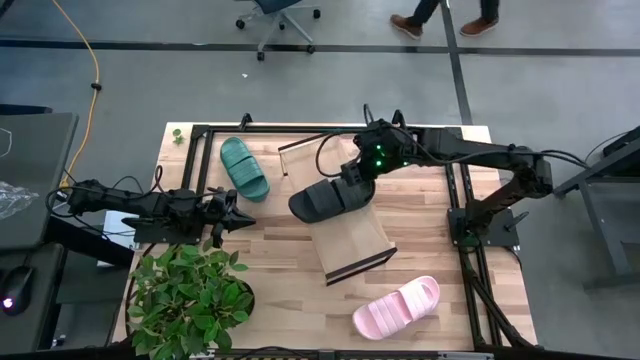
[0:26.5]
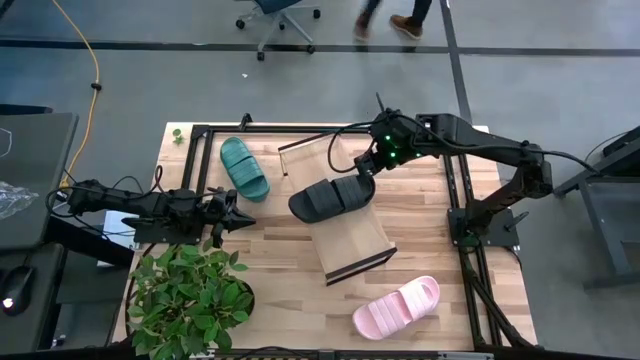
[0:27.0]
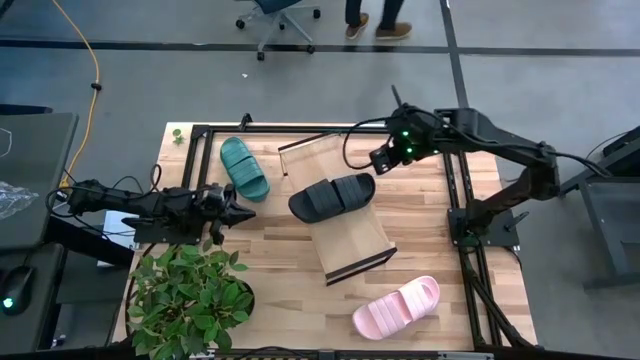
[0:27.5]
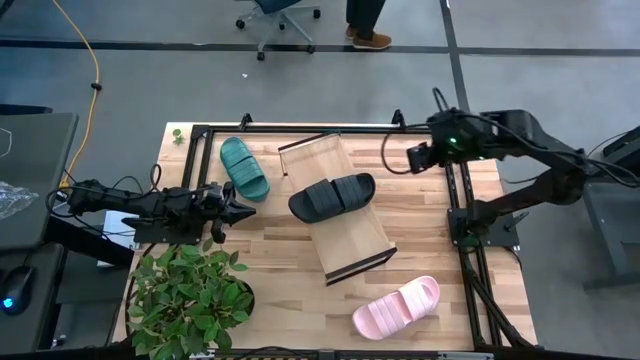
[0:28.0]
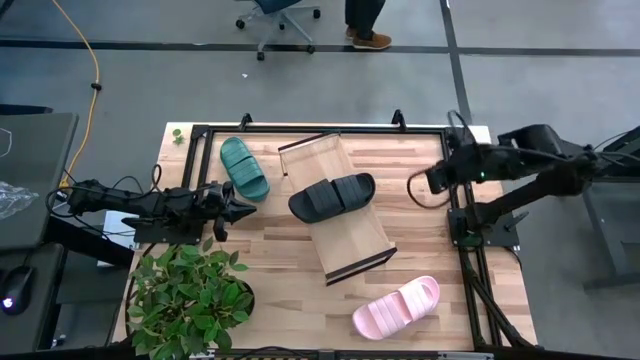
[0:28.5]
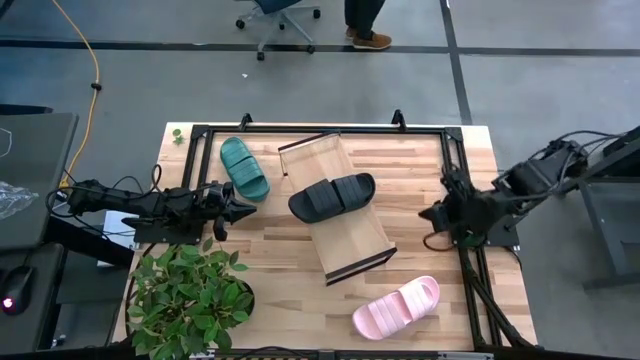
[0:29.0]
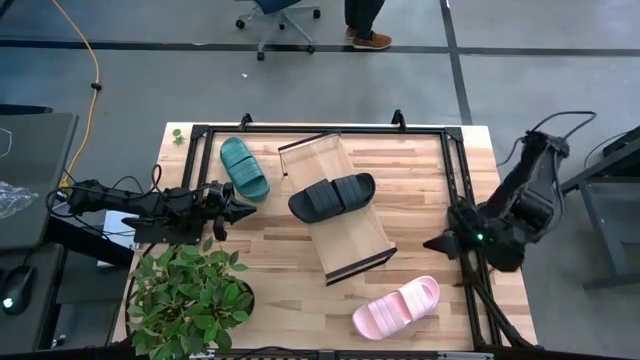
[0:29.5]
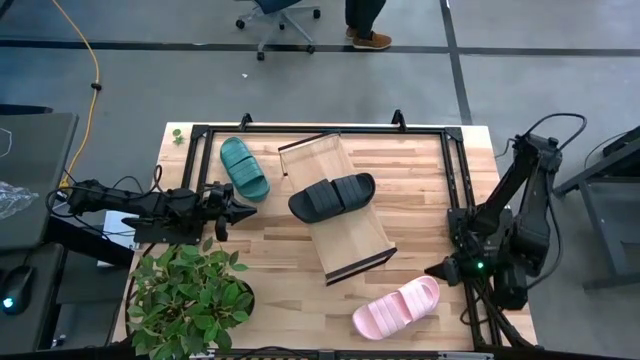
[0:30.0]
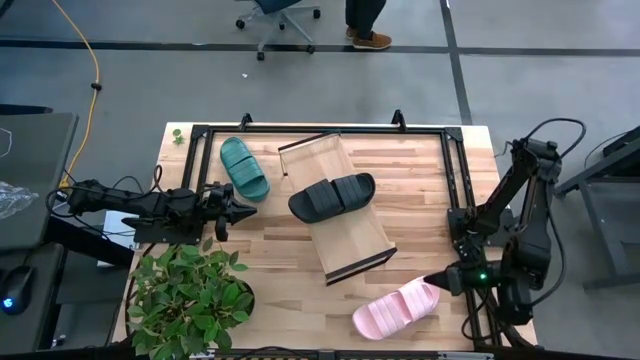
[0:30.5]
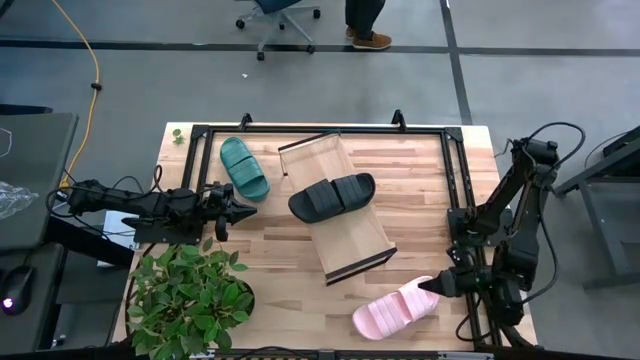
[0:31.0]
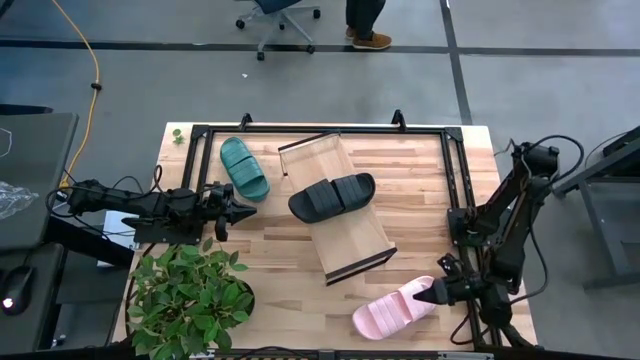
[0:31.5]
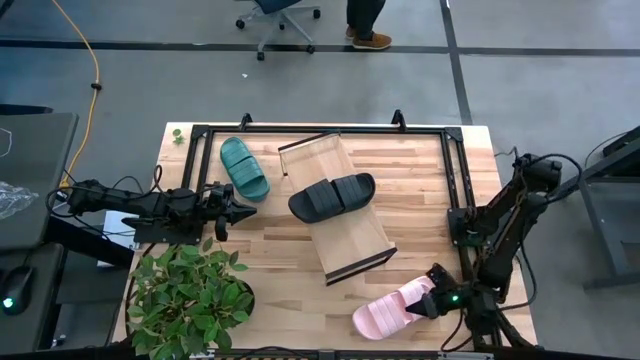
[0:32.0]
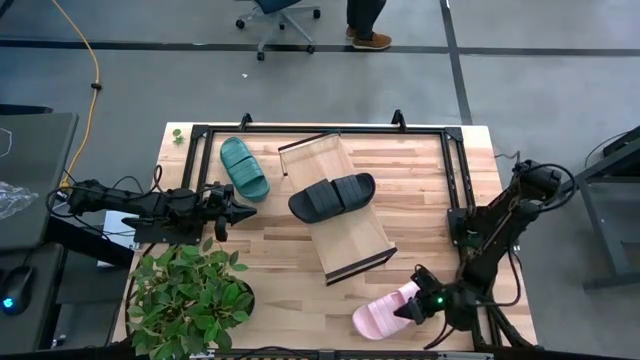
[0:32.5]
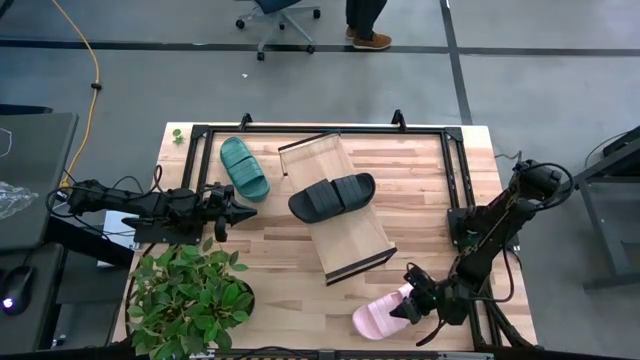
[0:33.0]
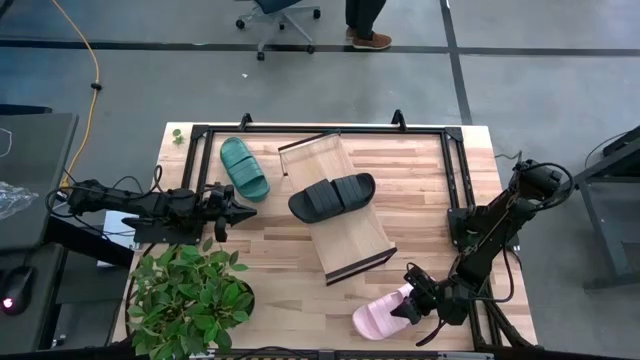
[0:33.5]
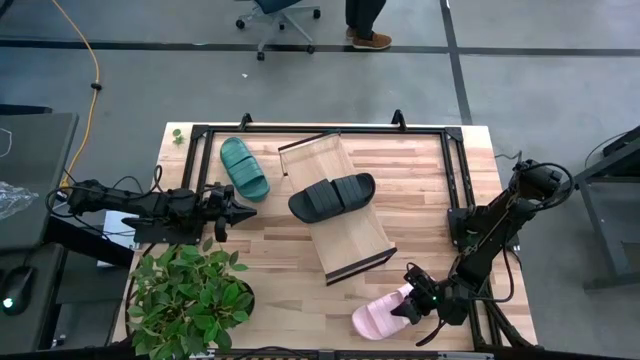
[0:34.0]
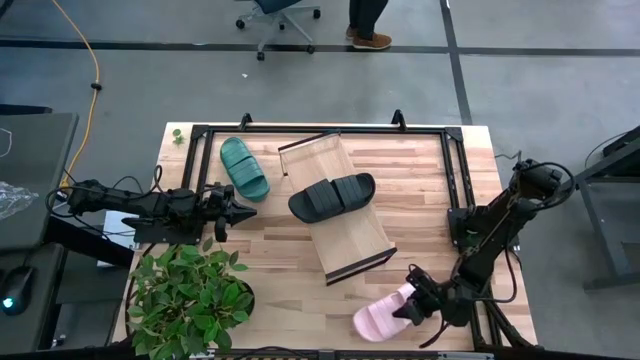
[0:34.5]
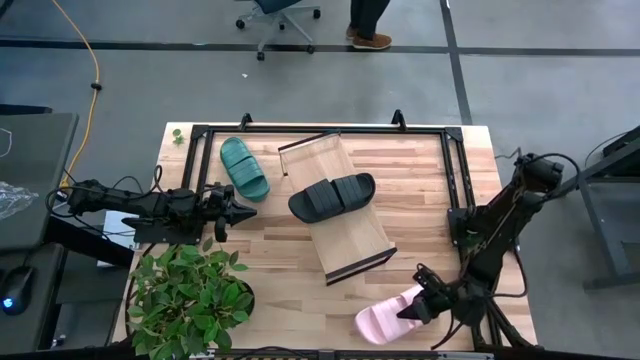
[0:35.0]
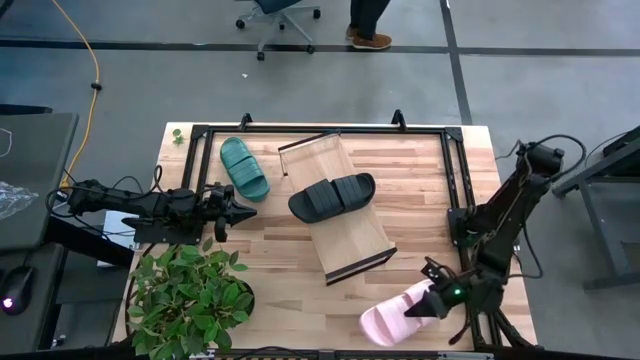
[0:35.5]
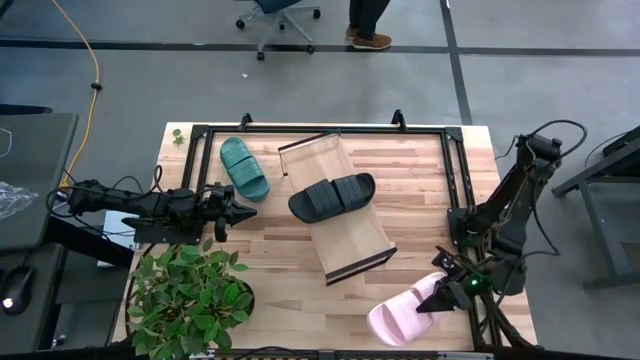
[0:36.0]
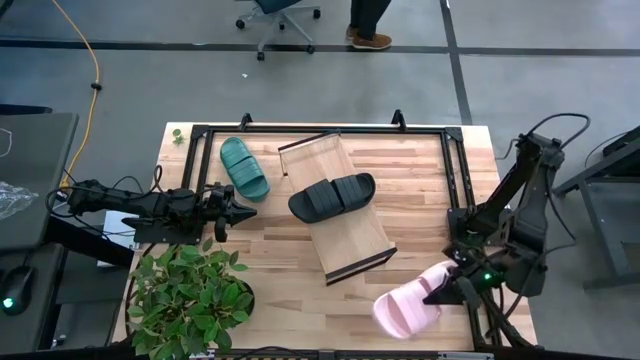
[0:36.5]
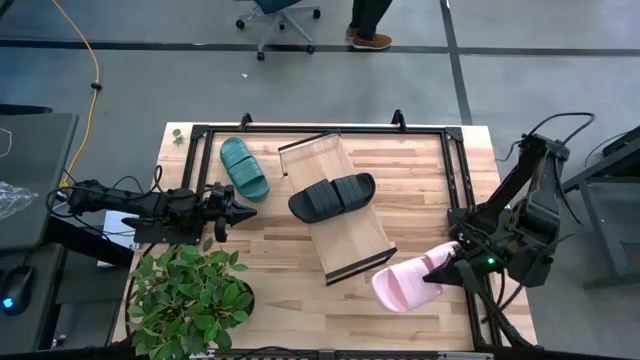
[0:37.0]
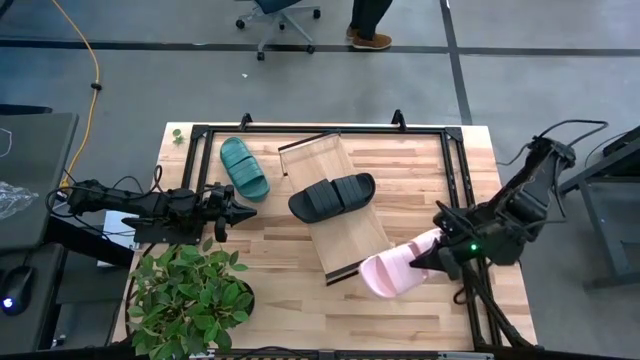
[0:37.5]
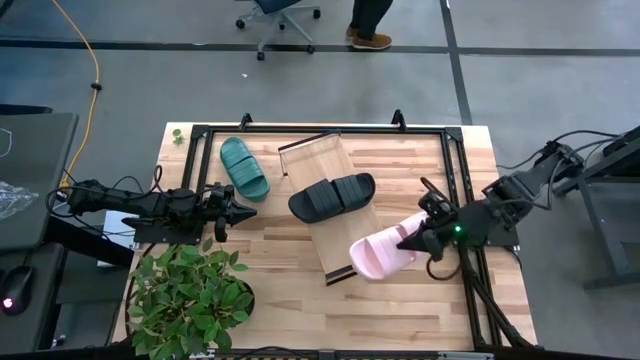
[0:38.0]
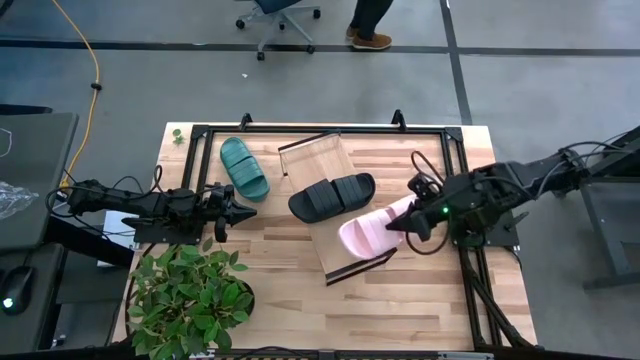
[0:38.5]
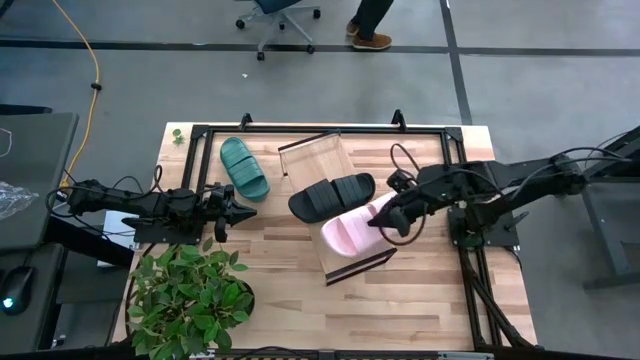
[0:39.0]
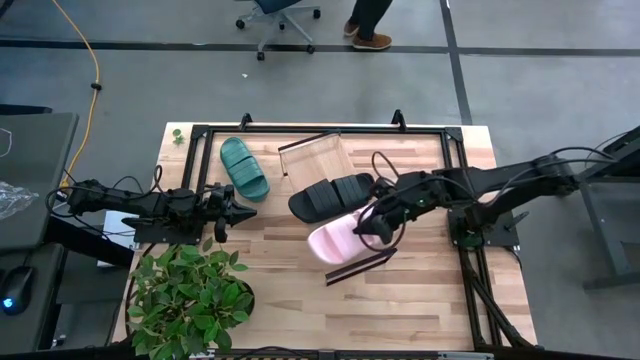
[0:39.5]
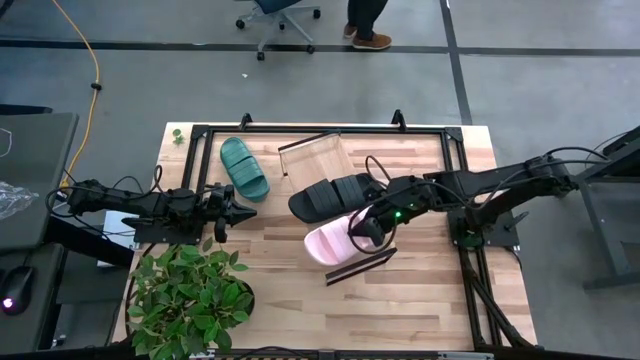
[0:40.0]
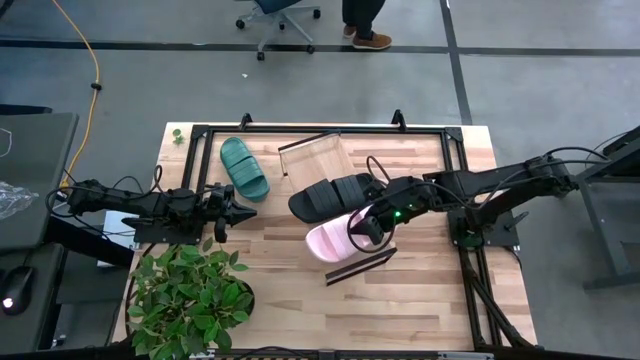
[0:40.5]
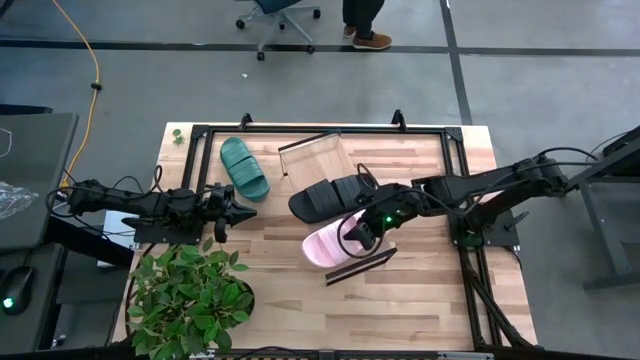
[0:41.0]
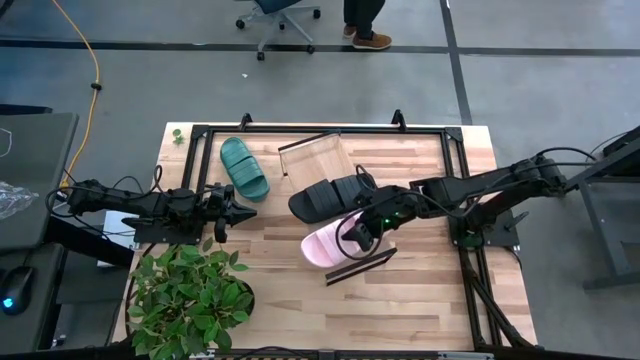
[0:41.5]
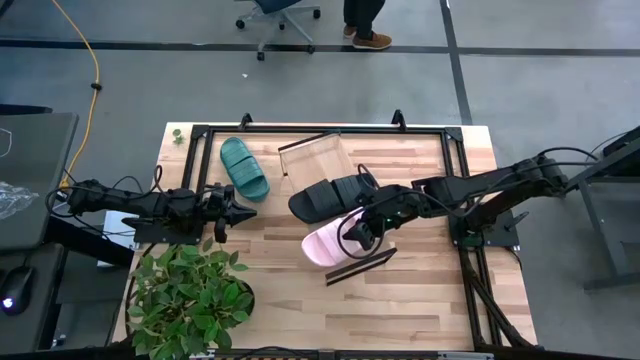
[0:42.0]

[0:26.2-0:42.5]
Task: Pick and place slides into the shelf
Put the pink pair of slides on the shelf
